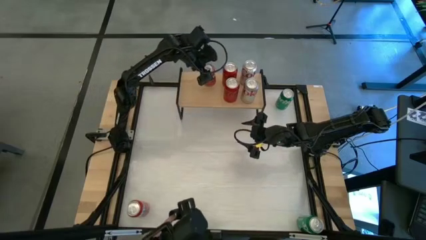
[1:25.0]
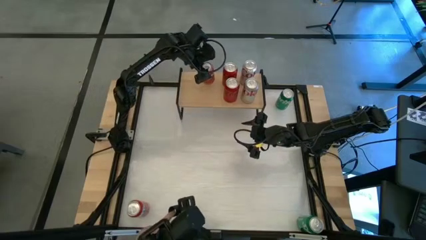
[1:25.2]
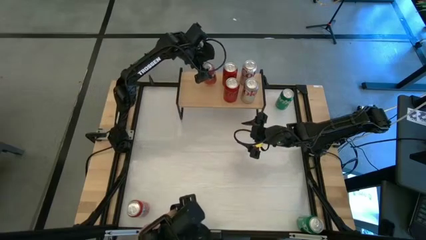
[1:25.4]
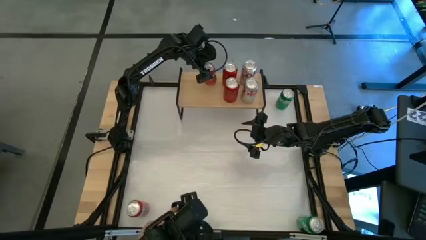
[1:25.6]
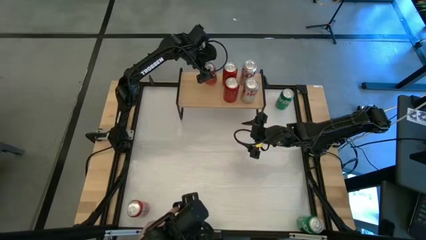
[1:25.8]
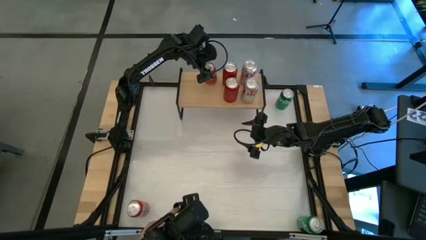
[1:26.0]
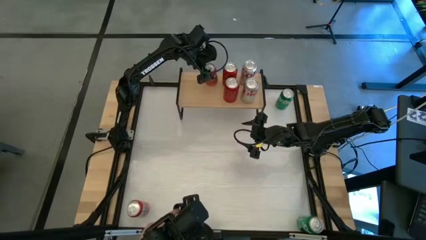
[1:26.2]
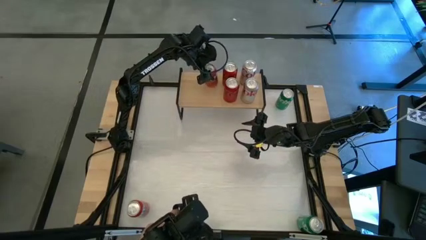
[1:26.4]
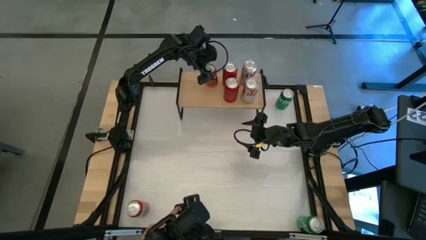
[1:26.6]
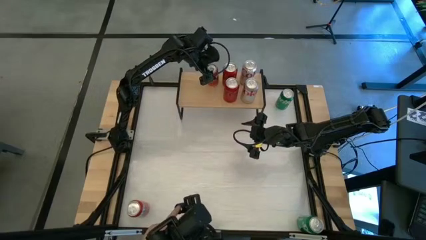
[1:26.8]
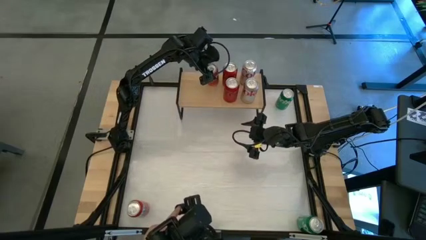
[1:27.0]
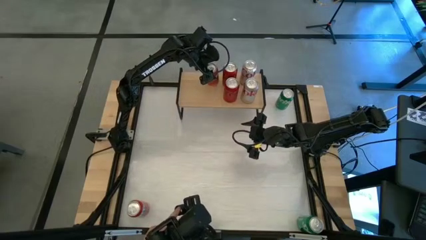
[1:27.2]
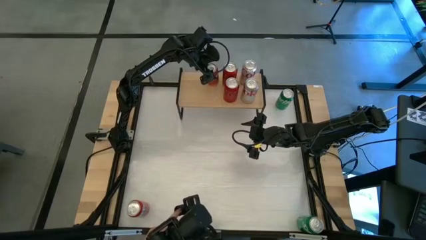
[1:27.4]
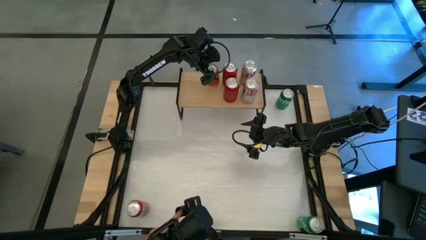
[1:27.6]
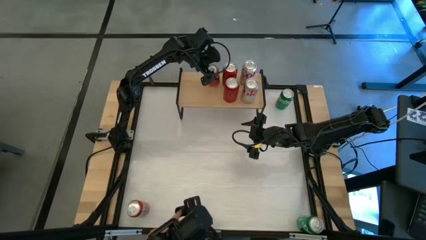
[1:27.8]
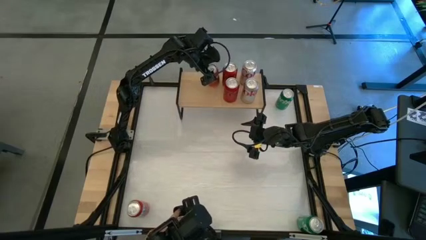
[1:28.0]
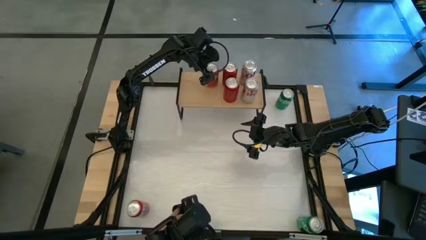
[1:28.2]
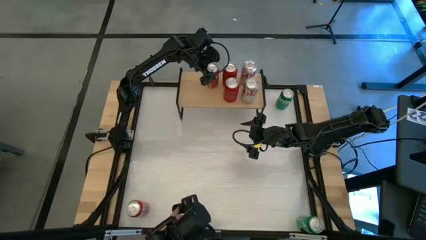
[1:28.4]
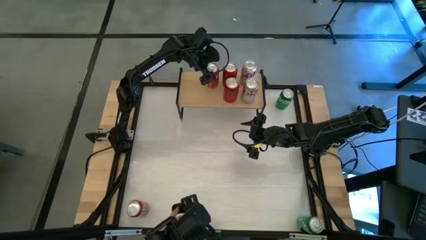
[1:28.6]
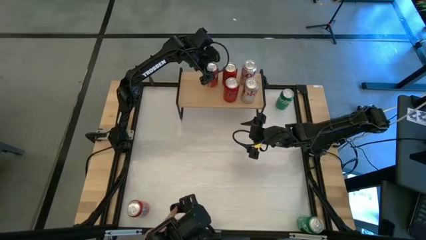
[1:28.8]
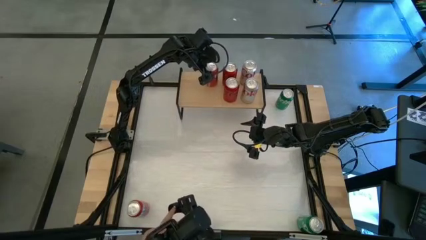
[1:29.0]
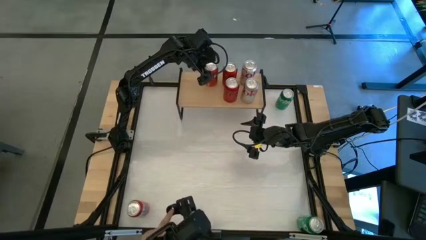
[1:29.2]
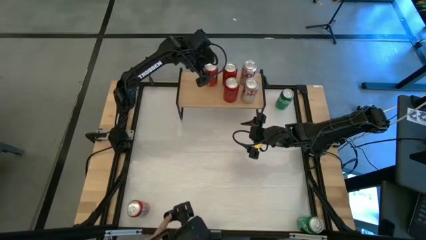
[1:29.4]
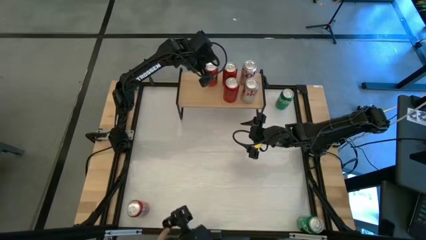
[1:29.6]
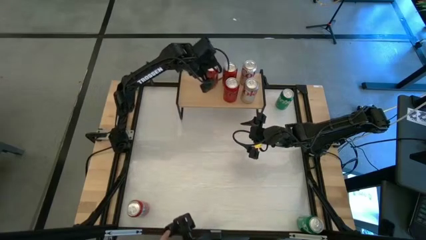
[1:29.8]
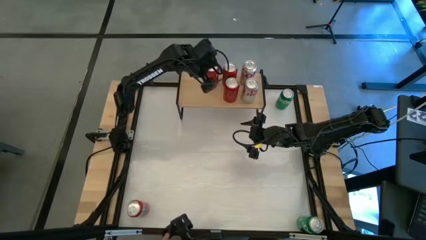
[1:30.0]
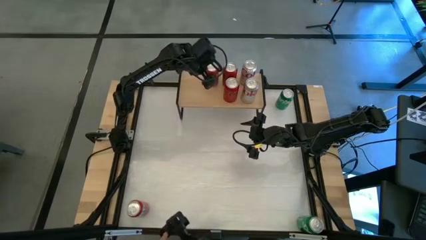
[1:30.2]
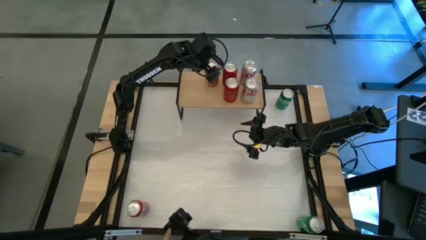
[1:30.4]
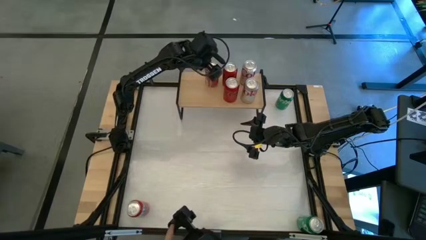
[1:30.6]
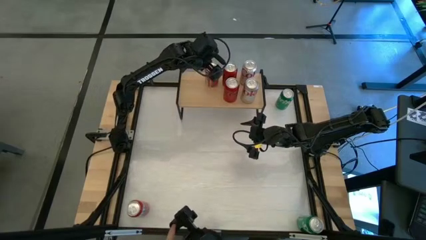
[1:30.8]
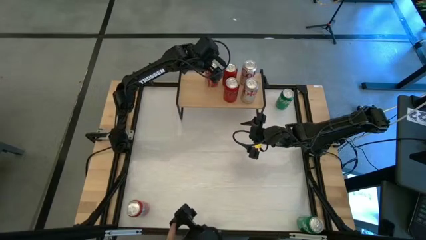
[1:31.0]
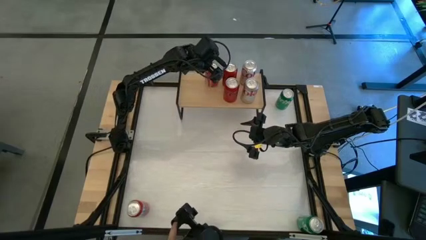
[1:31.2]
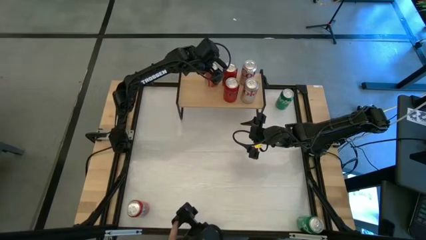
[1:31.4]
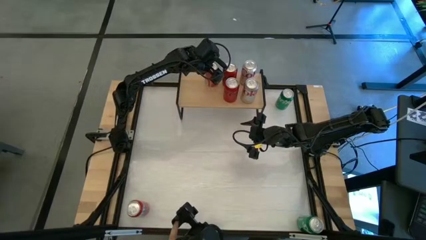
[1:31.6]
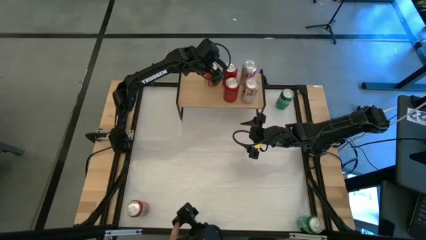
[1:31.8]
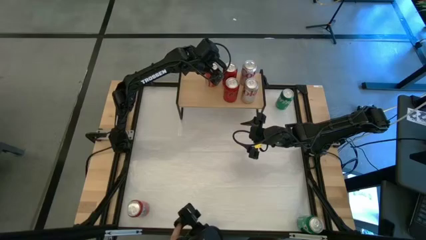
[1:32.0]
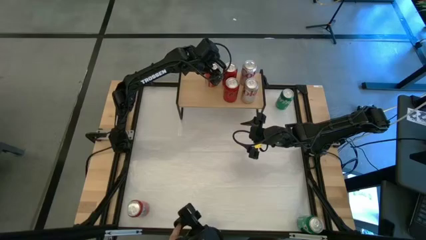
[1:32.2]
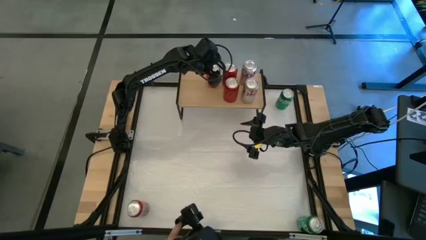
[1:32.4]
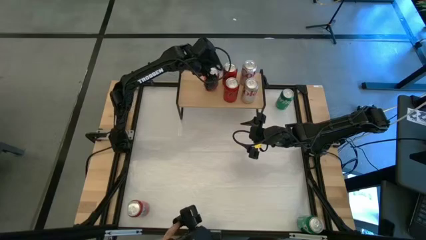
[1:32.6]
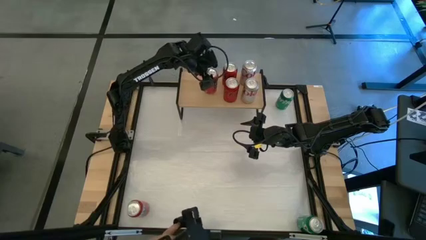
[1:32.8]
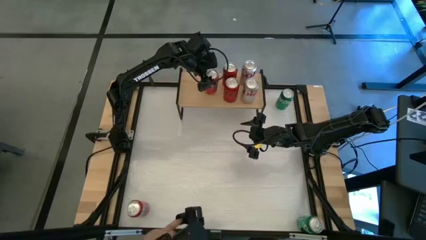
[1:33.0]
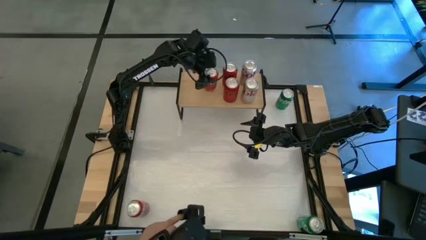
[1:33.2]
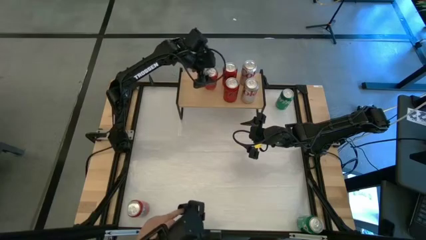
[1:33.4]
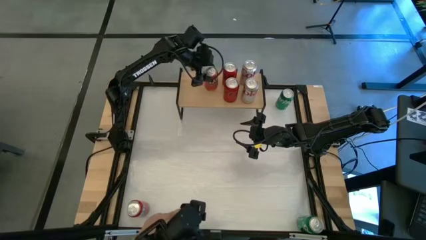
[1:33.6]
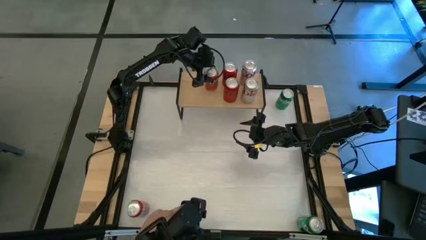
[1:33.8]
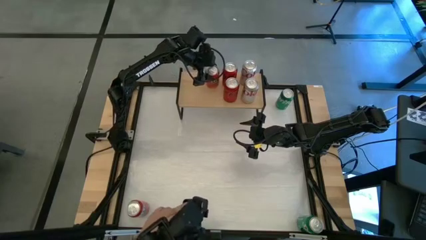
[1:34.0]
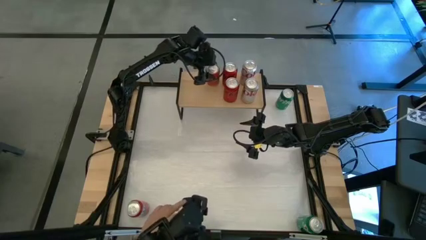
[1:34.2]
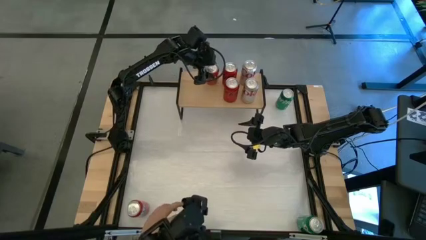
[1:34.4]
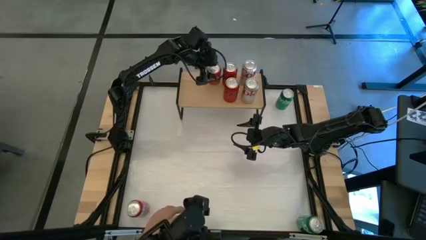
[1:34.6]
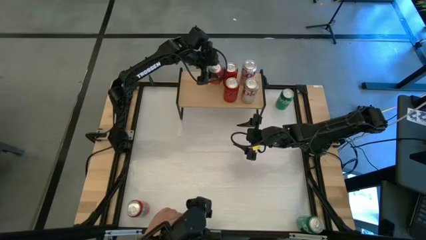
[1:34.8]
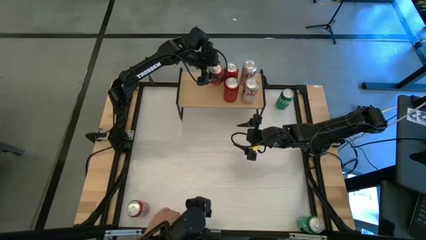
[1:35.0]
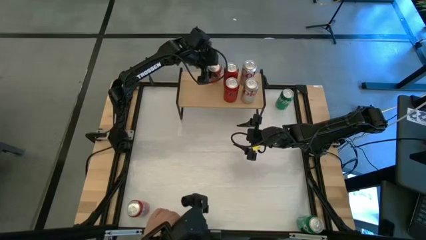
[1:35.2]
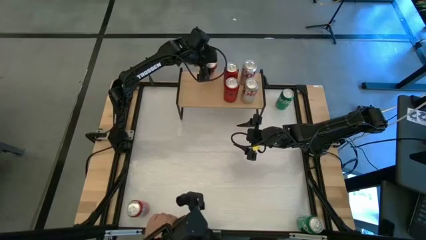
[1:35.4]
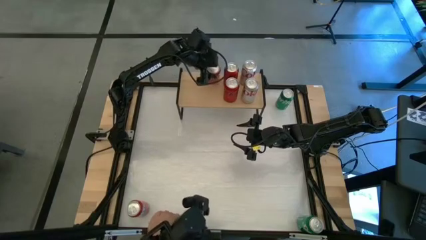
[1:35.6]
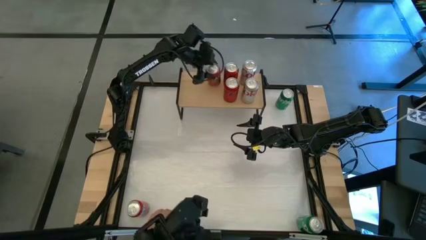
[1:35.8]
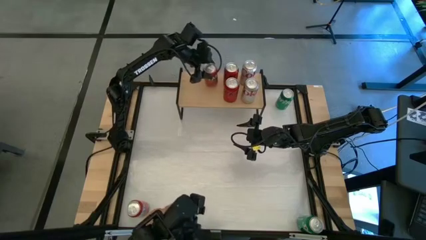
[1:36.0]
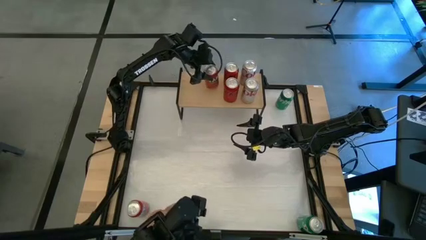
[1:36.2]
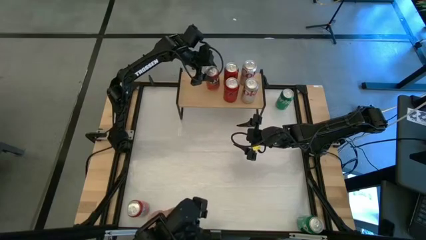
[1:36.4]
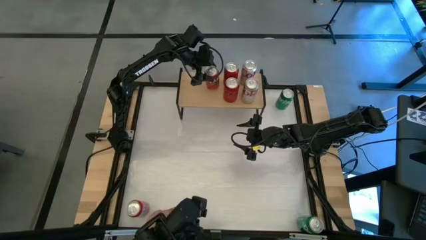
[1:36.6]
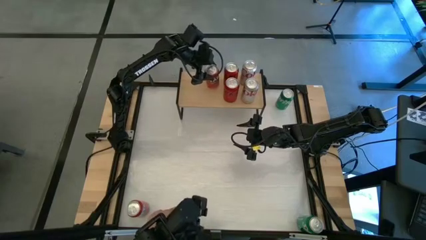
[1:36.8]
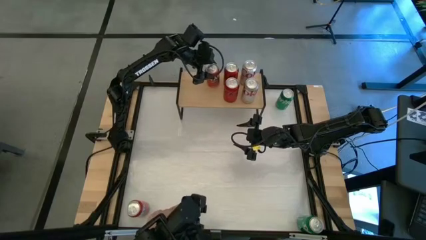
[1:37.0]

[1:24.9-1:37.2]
Task: Place canned beverage on shelf
Put the right red soda can on the shelf
